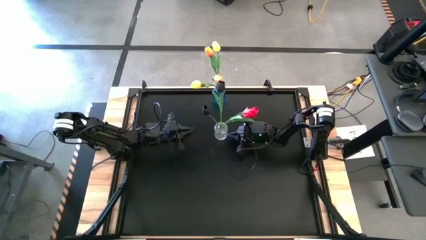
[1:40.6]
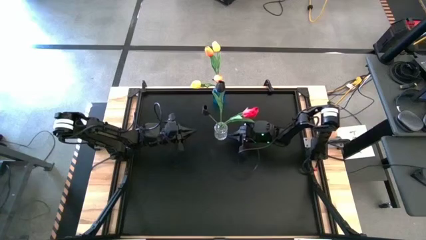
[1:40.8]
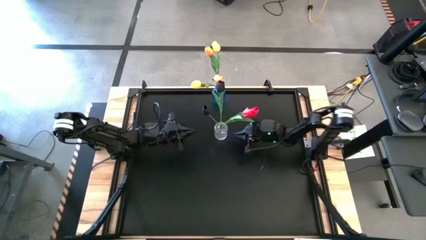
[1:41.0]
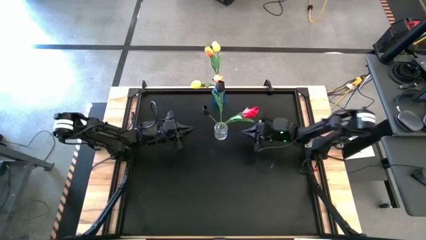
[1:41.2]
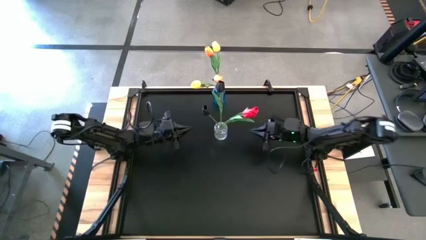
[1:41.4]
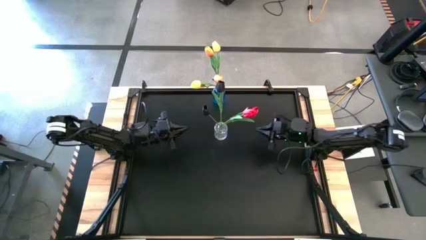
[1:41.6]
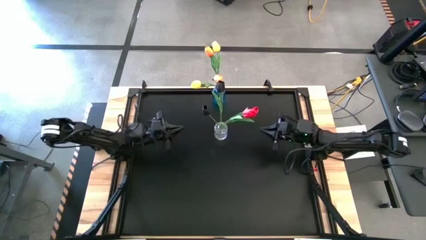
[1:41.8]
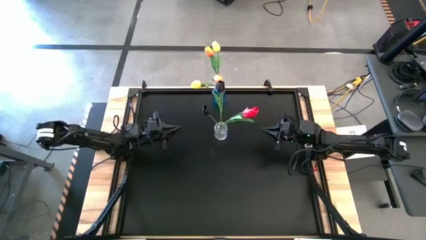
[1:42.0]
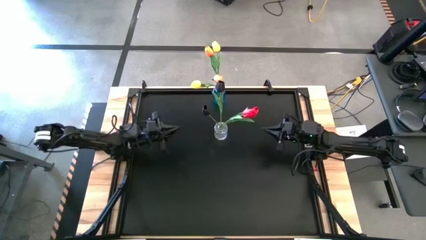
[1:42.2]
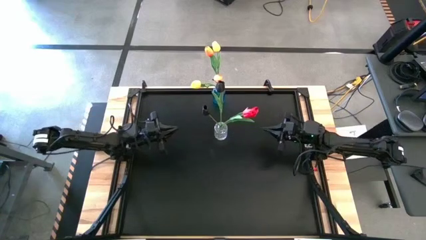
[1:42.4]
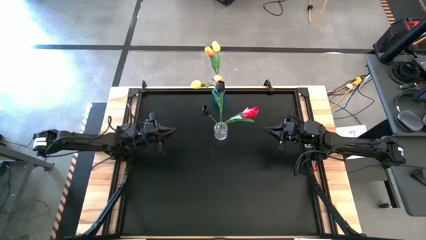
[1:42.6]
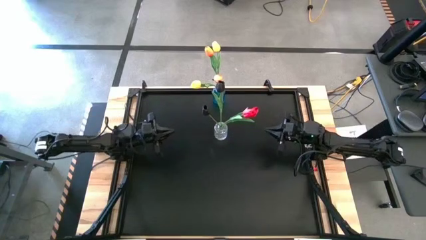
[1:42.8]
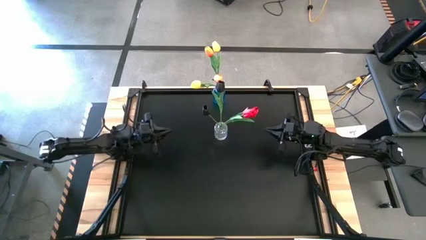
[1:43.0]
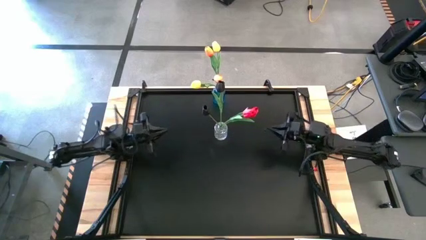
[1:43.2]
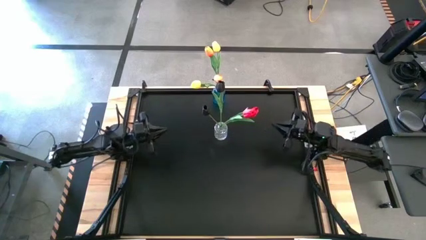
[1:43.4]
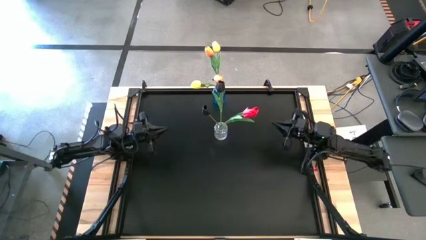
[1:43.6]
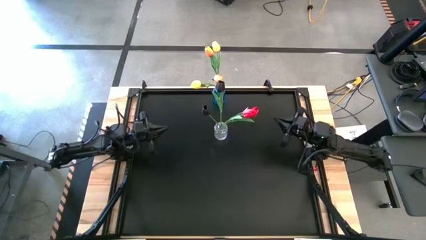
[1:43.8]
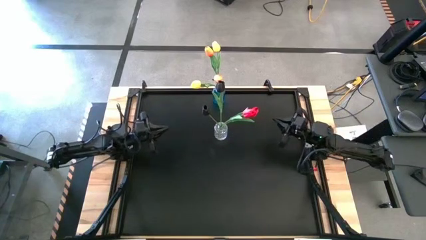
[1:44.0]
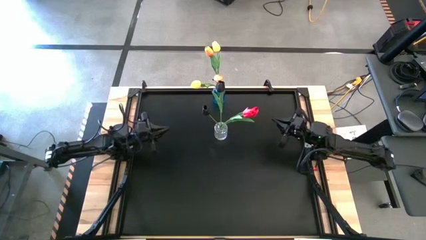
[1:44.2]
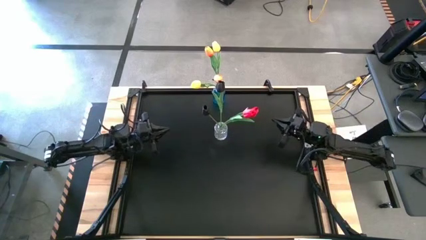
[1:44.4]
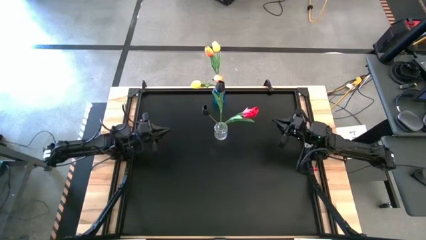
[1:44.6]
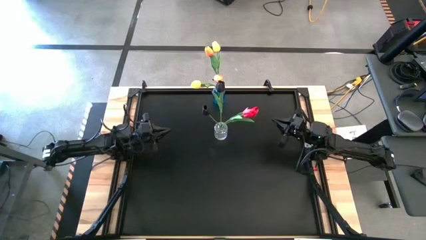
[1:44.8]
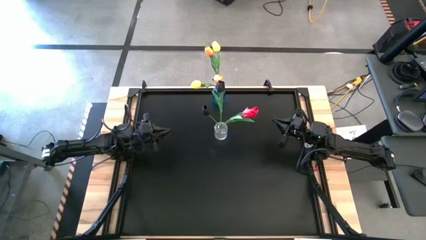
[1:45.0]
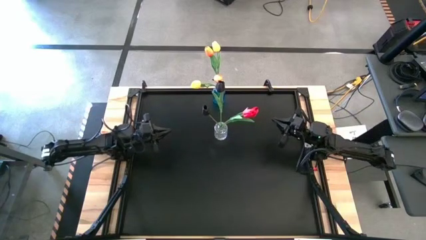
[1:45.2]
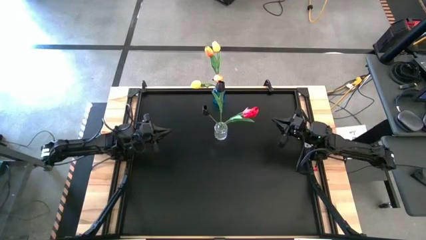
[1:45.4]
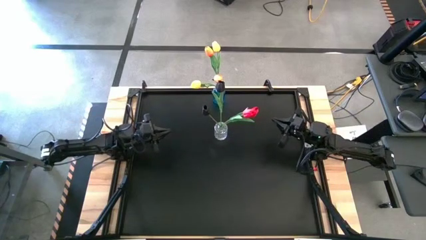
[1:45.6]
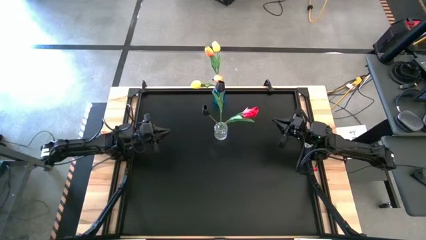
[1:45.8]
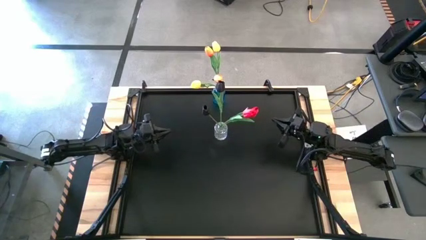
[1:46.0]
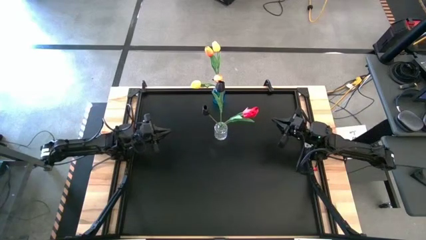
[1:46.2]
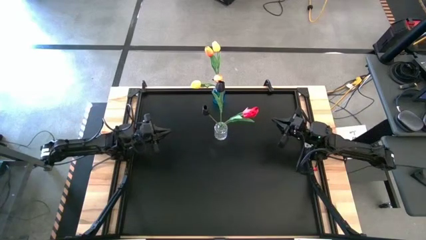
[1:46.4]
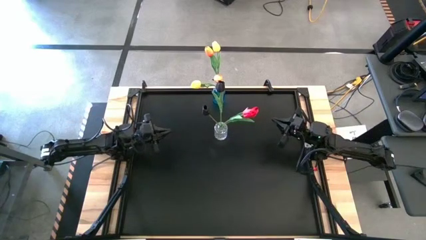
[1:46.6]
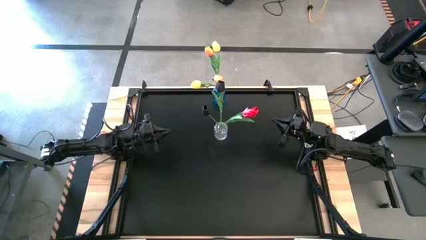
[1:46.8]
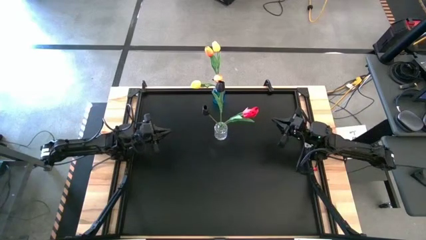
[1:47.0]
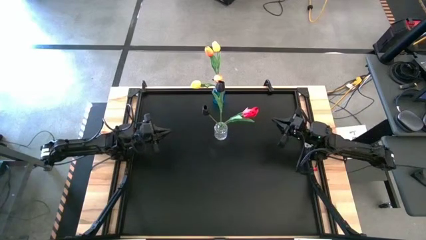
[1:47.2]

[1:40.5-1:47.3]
Task: Sort flowers into vase by color
Return to Home Position

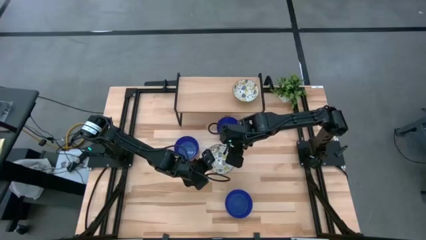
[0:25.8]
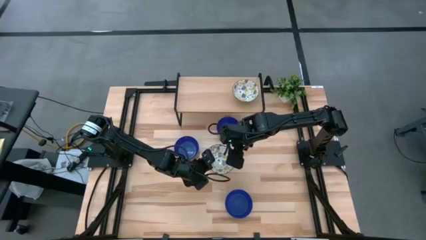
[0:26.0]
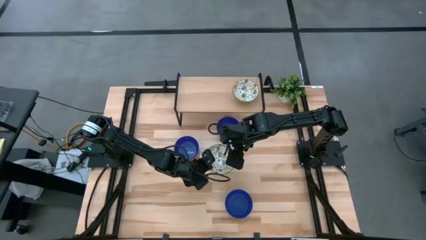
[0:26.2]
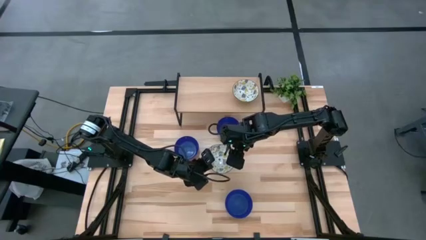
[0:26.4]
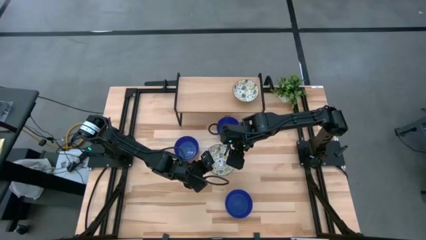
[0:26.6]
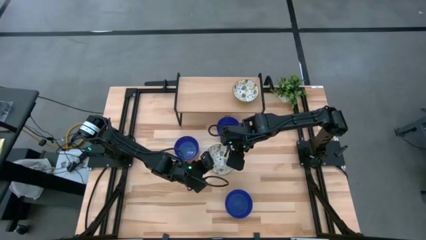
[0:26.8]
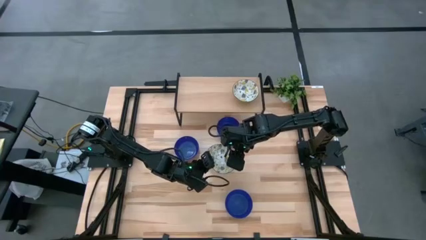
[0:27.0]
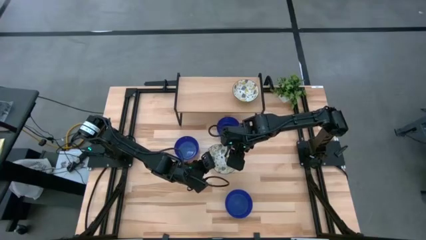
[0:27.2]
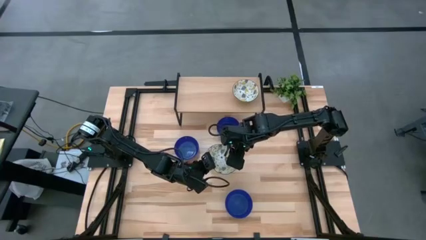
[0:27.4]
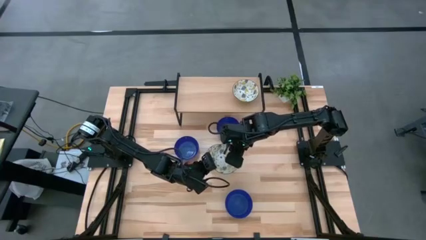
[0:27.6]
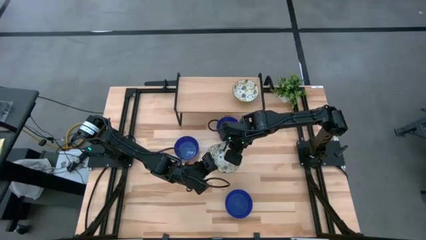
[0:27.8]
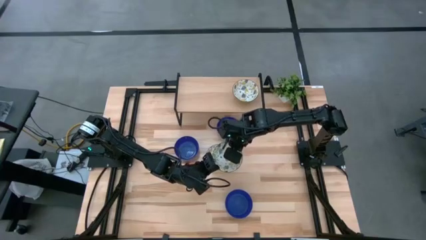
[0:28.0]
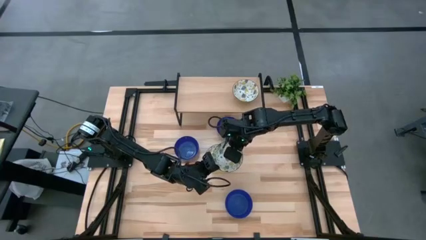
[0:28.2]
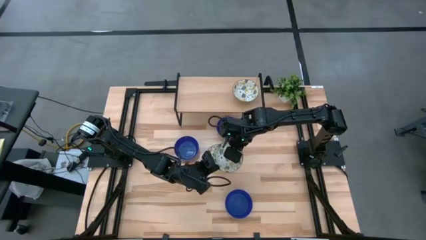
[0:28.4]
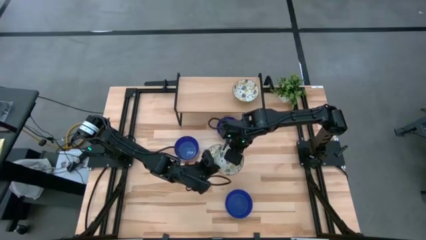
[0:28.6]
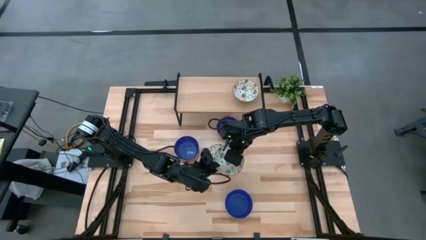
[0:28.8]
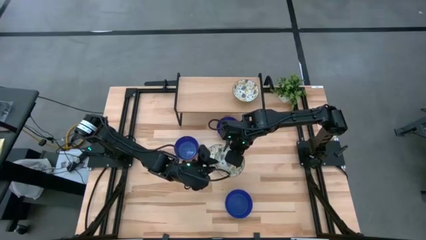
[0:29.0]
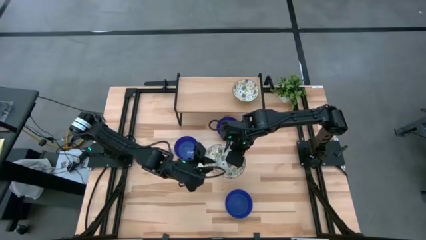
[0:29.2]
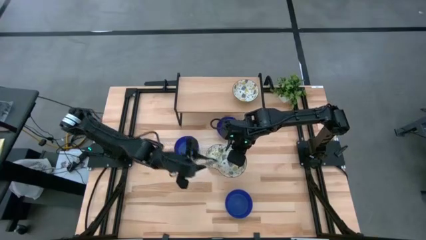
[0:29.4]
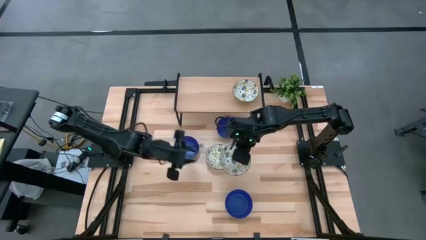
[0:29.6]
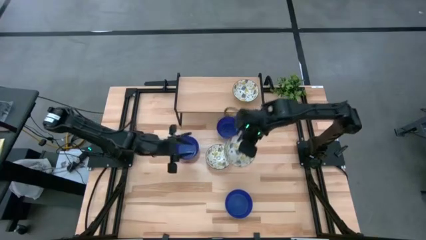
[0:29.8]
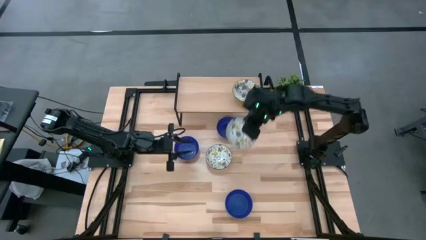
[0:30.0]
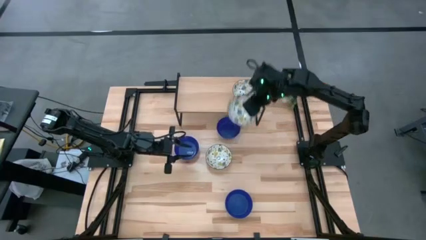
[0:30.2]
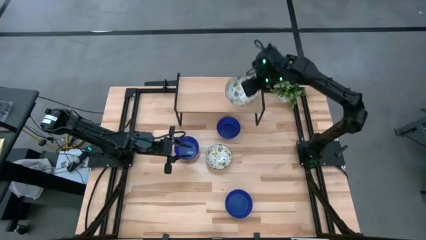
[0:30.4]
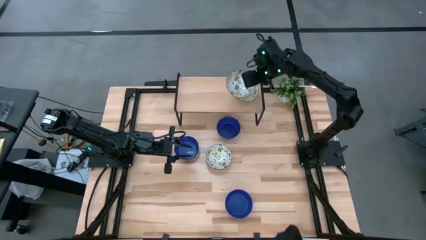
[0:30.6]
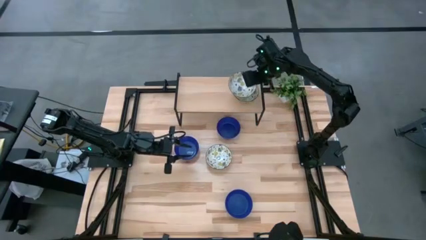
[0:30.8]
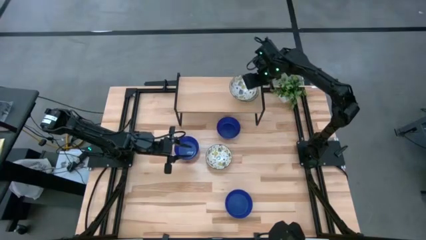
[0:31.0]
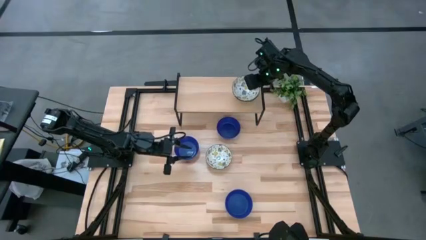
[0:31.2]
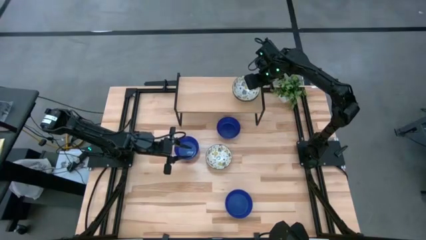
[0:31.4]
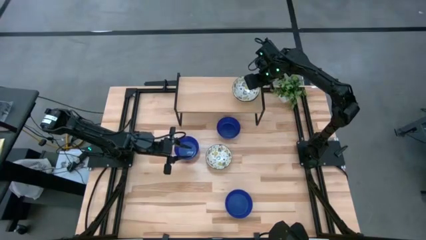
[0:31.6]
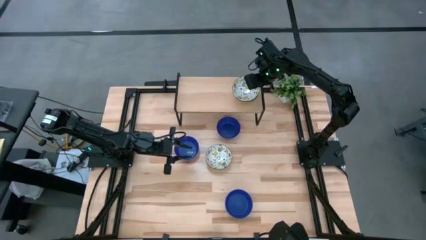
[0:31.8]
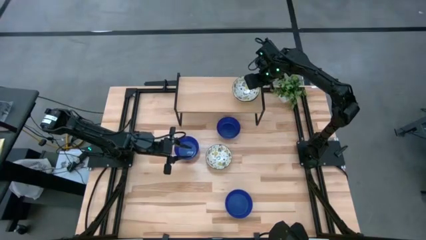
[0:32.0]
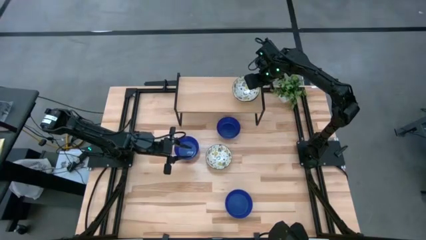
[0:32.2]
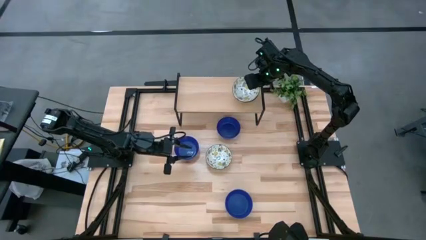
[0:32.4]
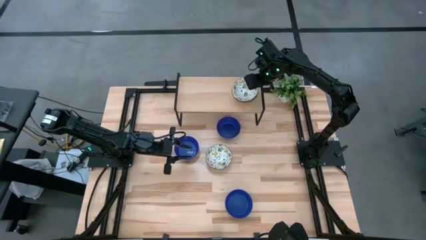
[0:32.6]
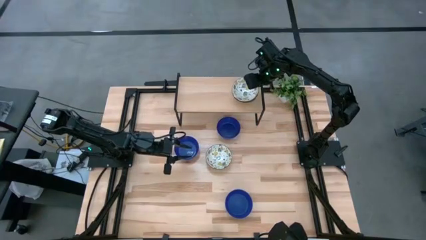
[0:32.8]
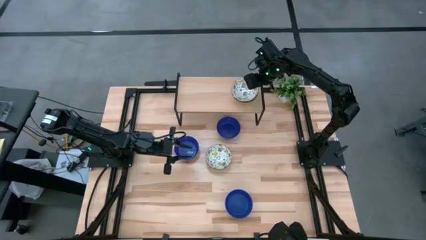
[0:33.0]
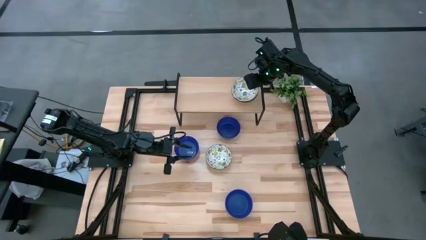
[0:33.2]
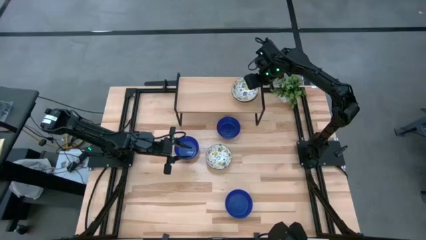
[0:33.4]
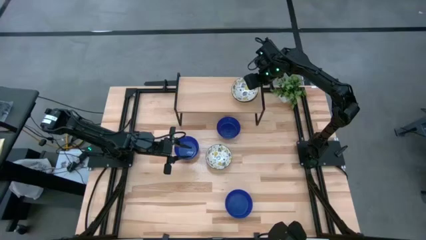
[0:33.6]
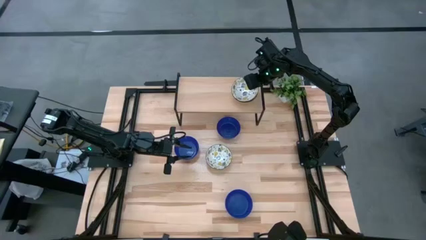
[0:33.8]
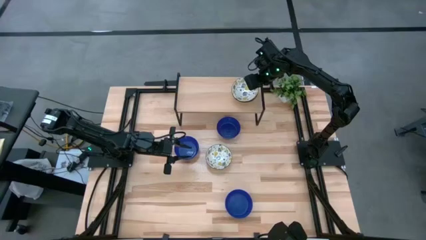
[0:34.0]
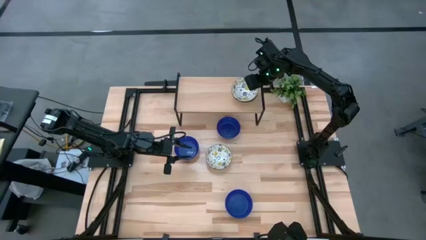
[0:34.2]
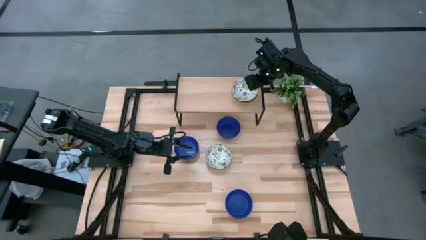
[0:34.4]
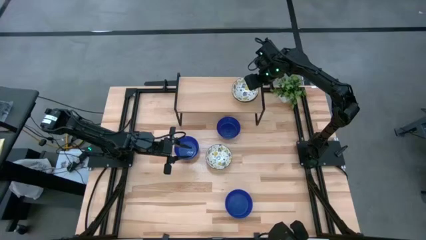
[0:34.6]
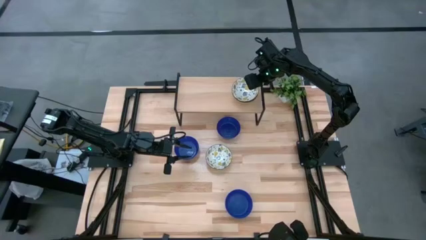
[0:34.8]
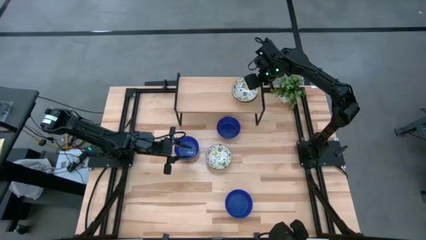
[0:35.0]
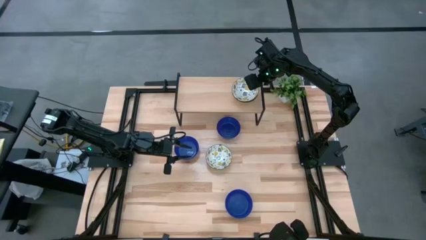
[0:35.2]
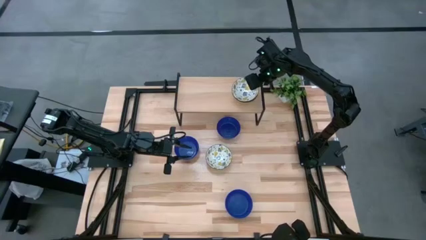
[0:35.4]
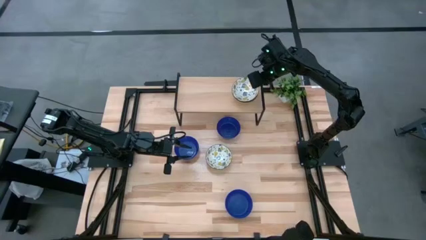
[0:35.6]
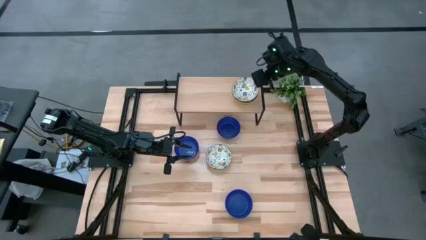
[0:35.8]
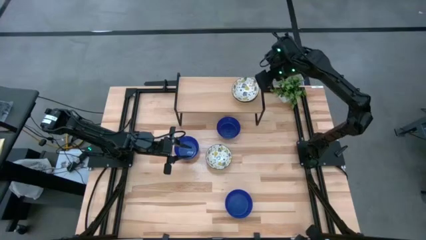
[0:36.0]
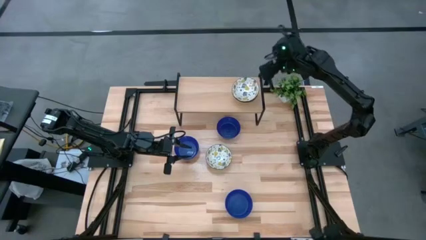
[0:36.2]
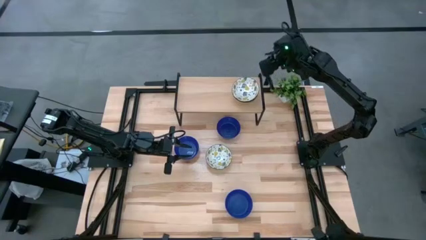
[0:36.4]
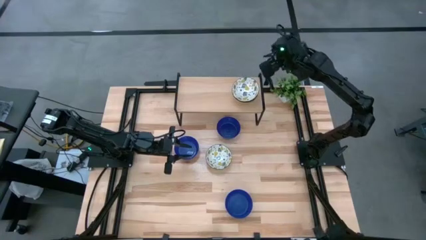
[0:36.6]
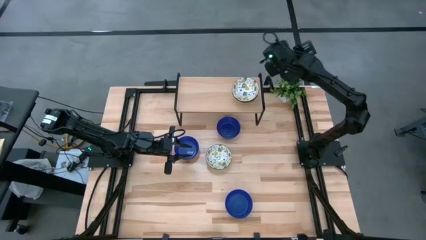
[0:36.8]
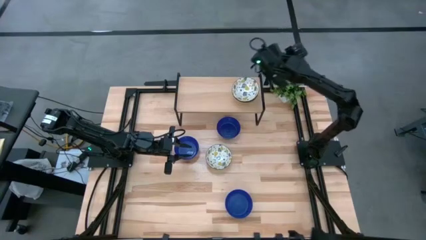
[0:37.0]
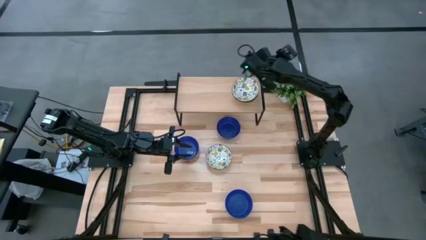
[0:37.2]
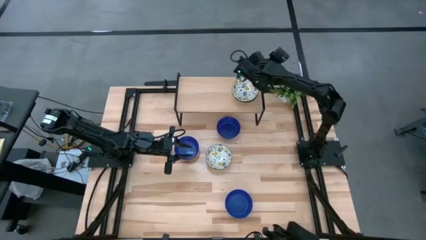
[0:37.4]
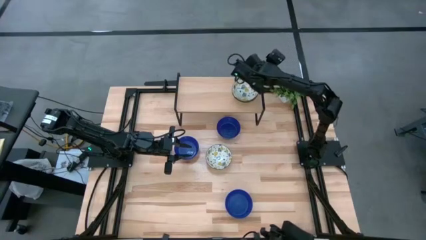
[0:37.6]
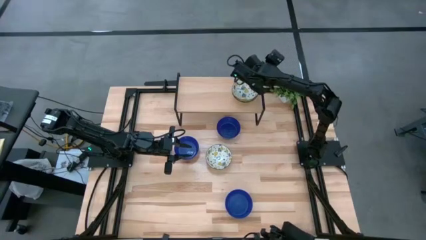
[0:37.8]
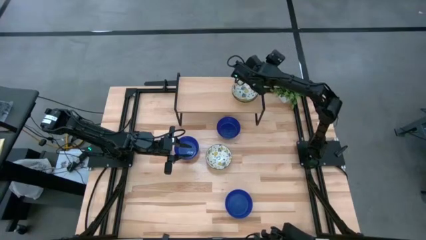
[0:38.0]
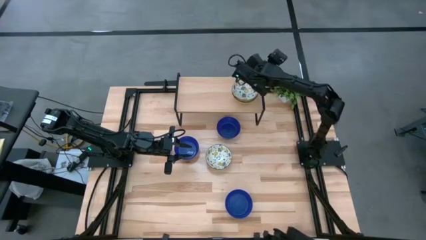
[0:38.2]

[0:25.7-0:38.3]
Task: Pick & Place Mini bowls
Stack the bottom yellow patterned bowl on the yellow patterned bowl on the shelf
